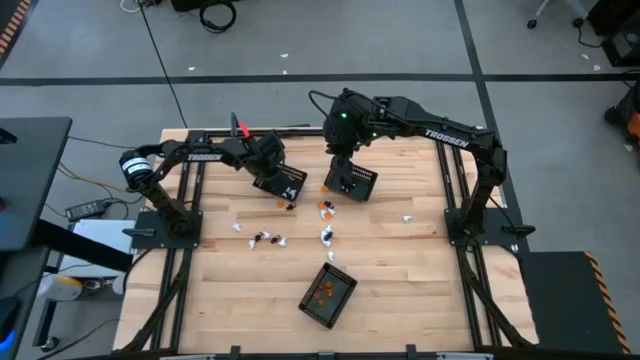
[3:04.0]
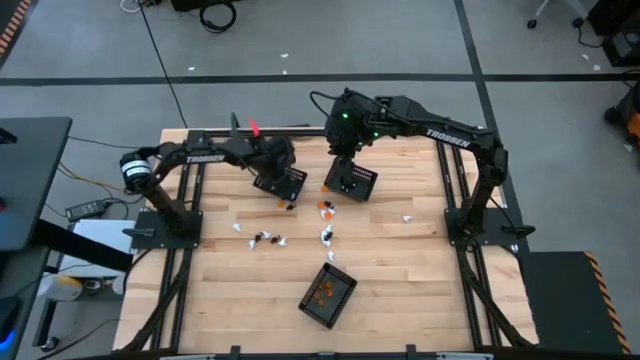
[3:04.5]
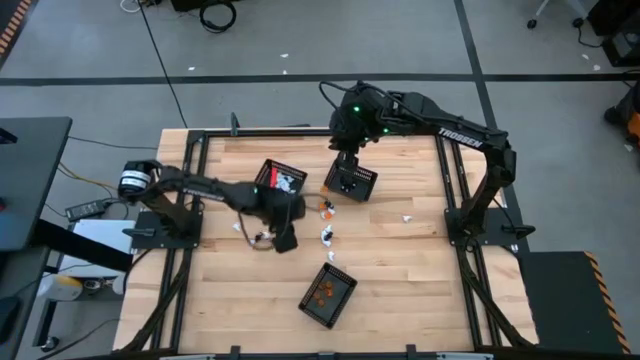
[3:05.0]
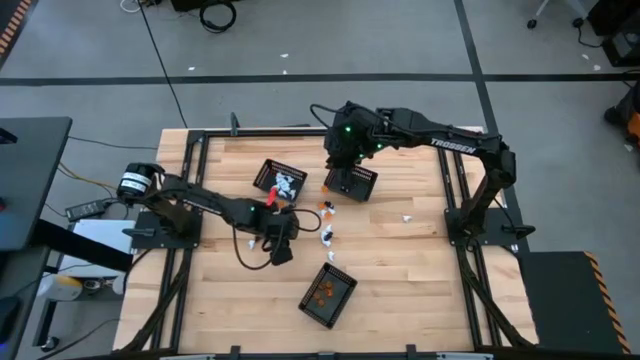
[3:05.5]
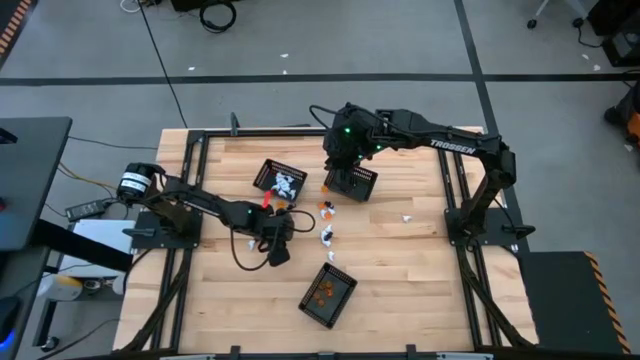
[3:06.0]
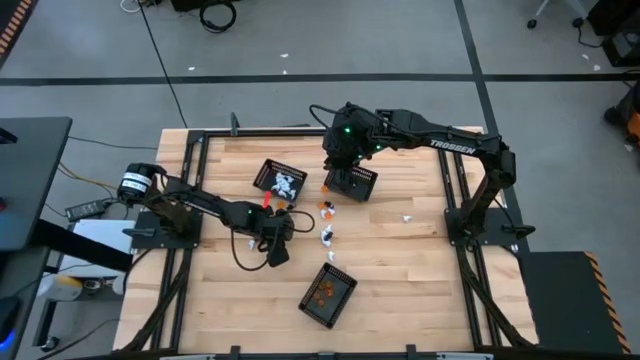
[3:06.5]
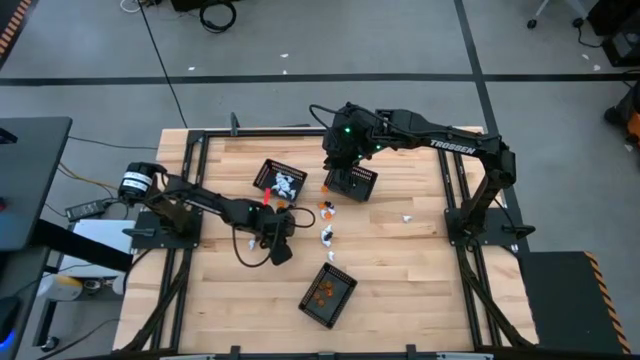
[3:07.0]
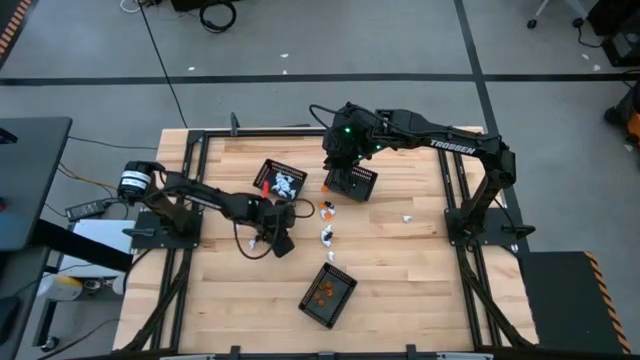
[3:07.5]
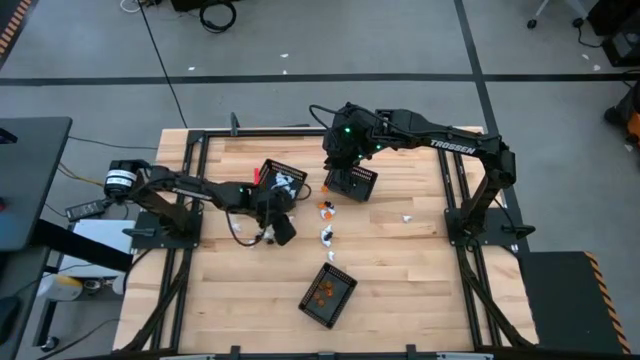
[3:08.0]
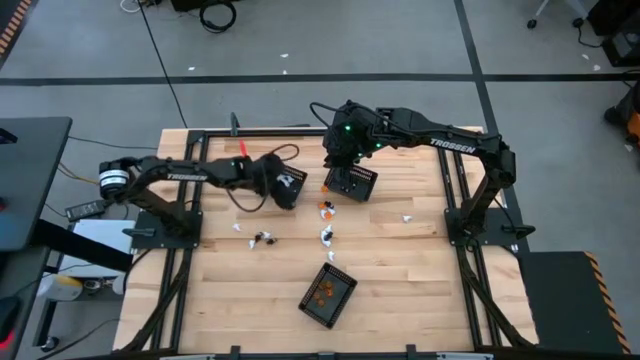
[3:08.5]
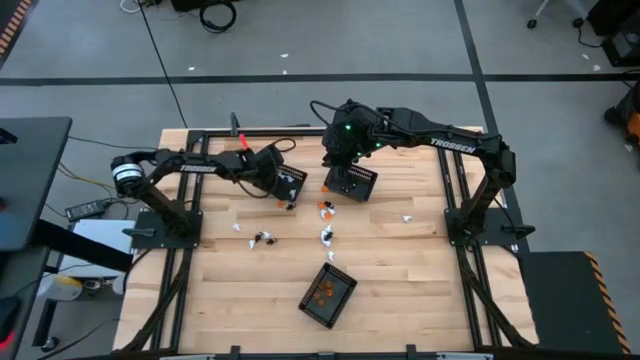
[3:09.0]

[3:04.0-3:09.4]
Task: Sort Halloween decoration
Put the white ghost toy into the top left black basket

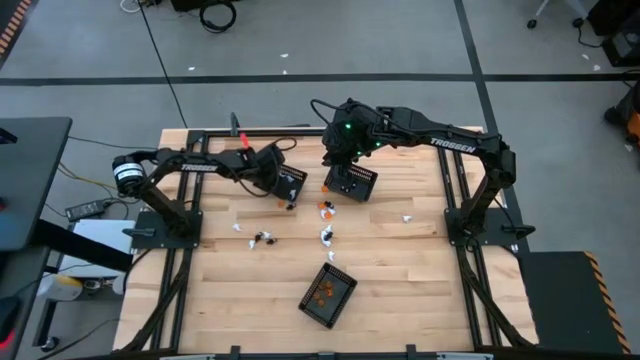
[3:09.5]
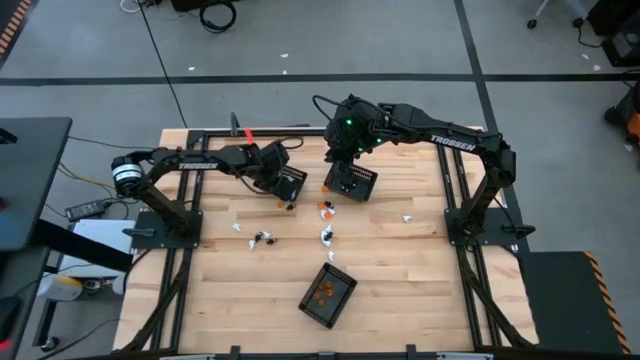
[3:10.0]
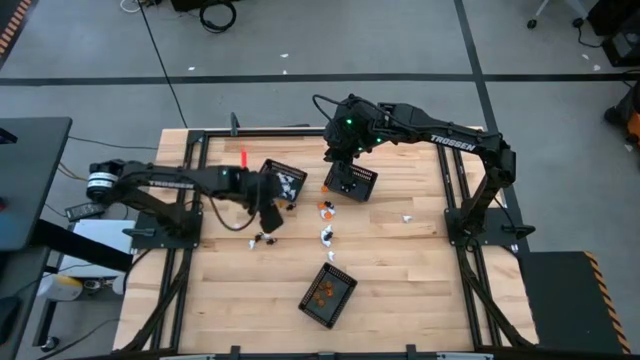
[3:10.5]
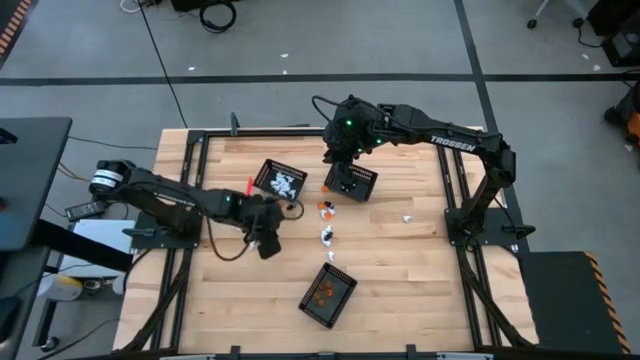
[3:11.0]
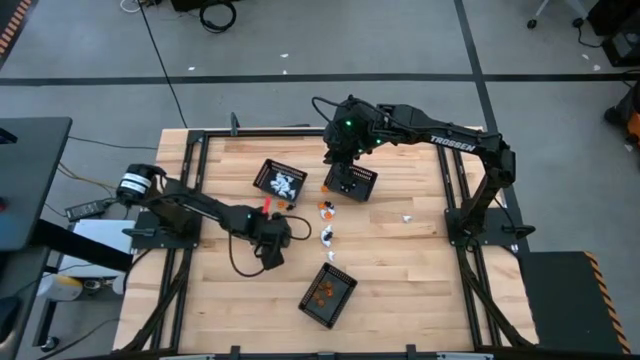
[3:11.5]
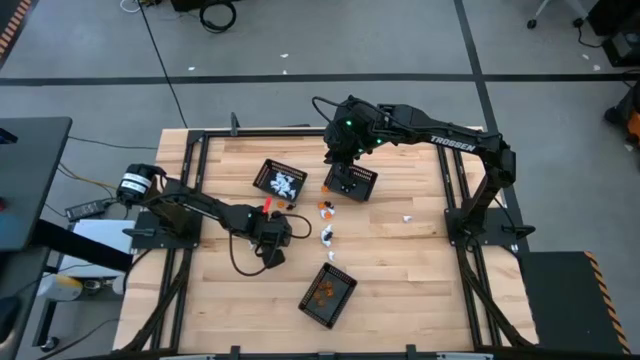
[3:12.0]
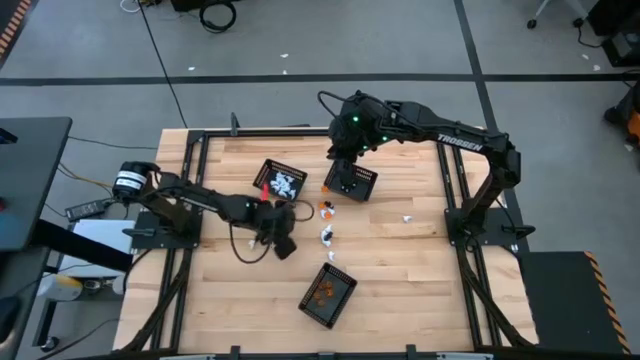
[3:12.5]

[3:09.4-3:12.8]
Put the black skeleton toy into the top right black basket

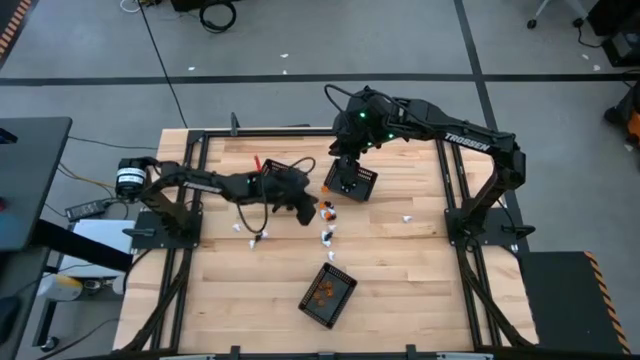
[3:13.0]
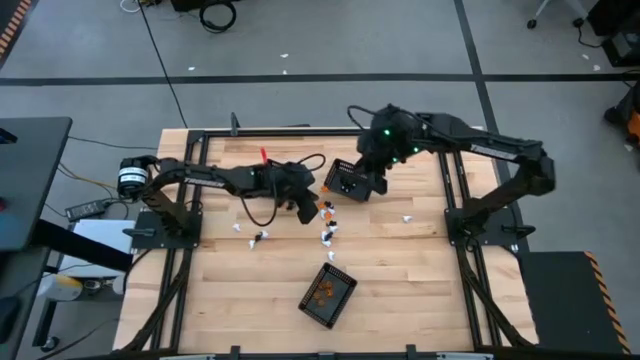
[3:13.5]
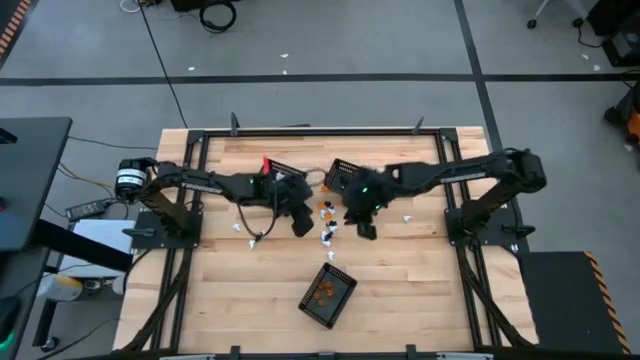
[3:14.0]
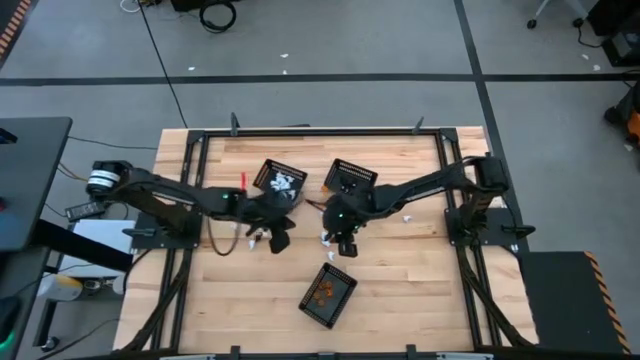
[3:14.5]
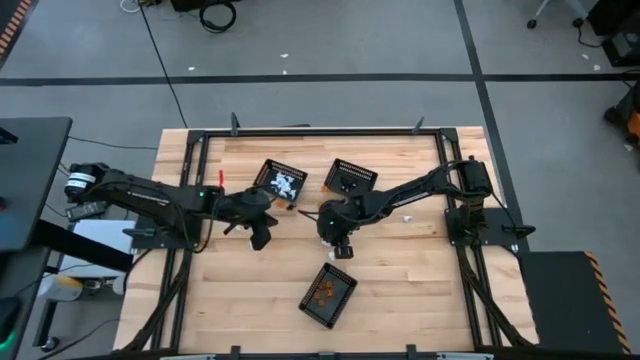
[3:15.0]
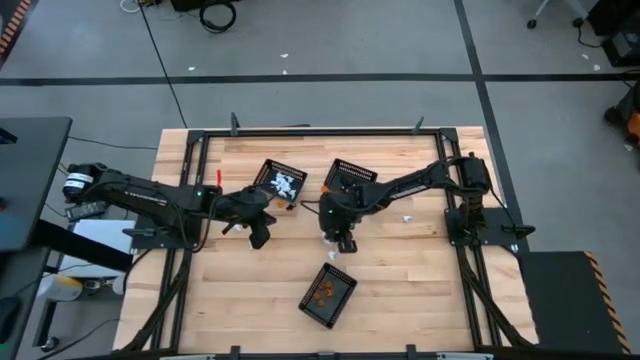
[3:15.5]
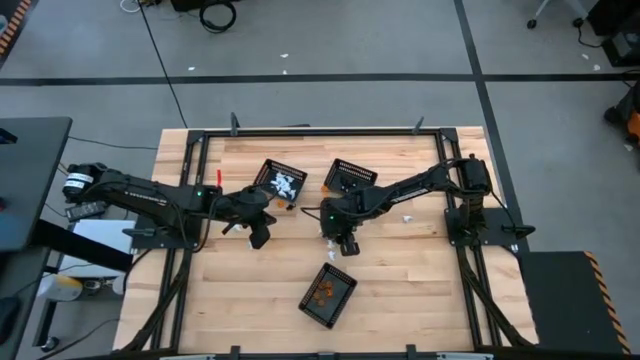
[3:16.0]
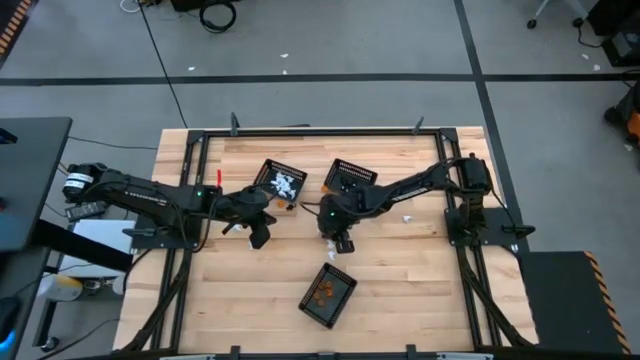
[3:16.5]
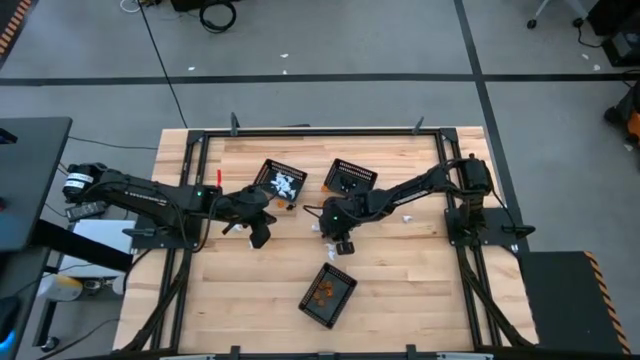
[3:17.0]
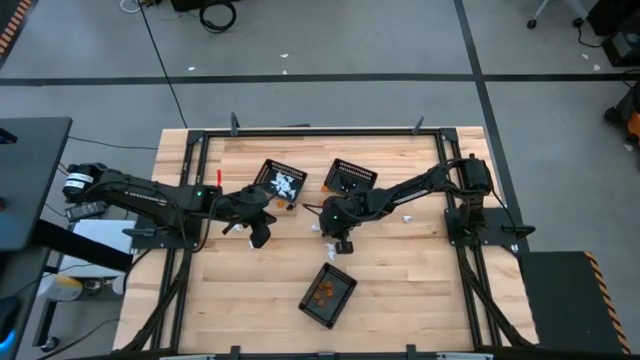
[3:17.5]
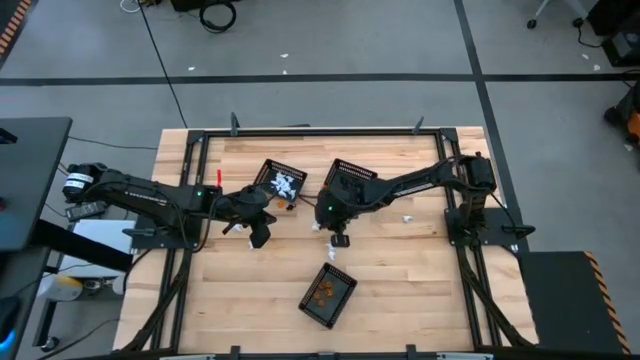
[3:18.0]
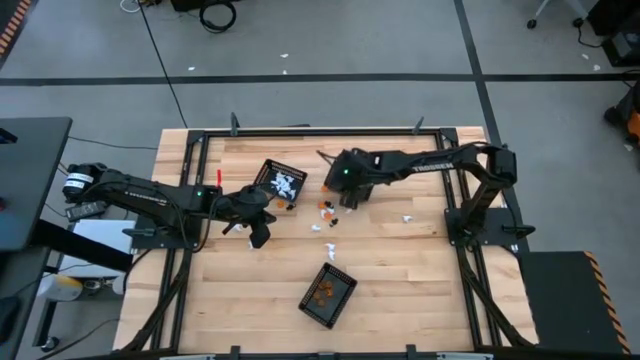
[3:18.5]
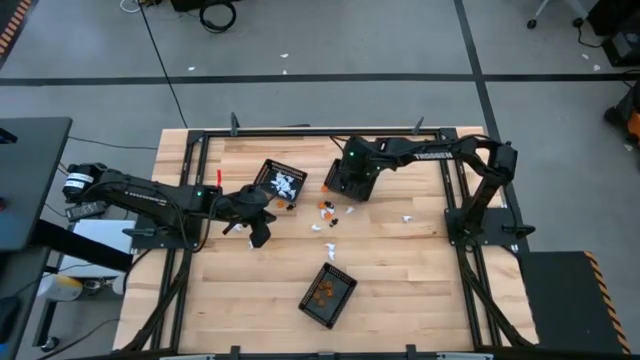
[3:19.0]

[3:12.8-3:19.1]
Put the black skeleton toy into the top right black basket

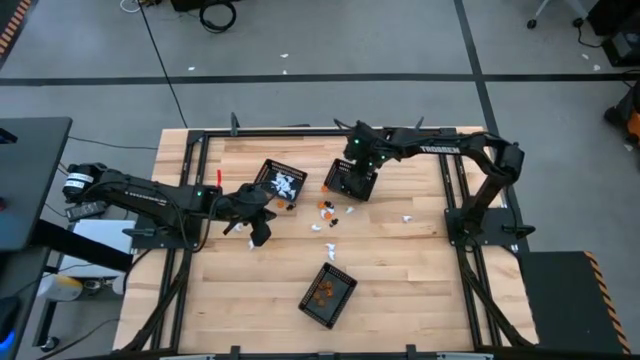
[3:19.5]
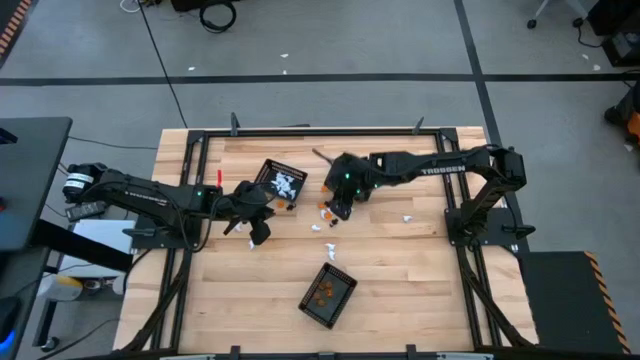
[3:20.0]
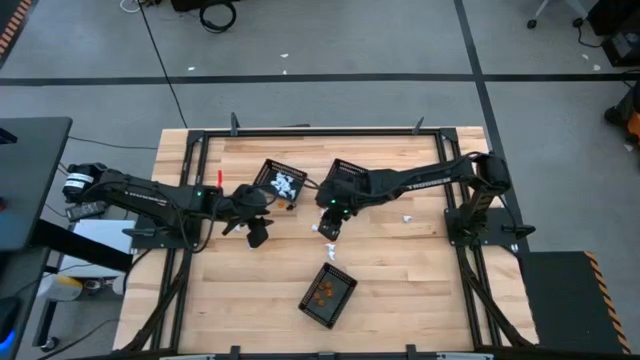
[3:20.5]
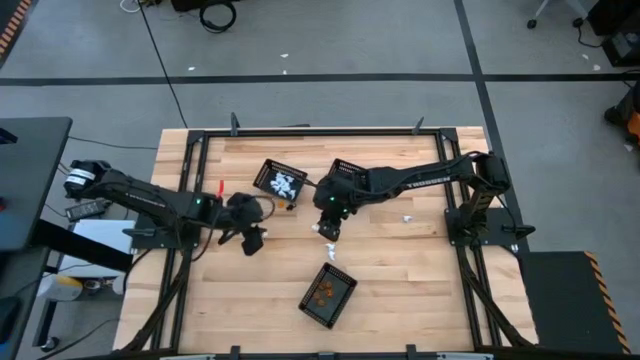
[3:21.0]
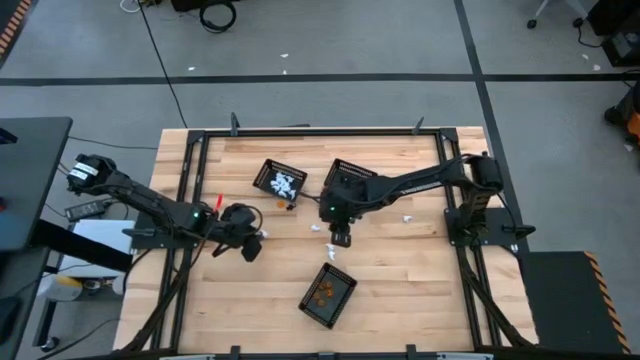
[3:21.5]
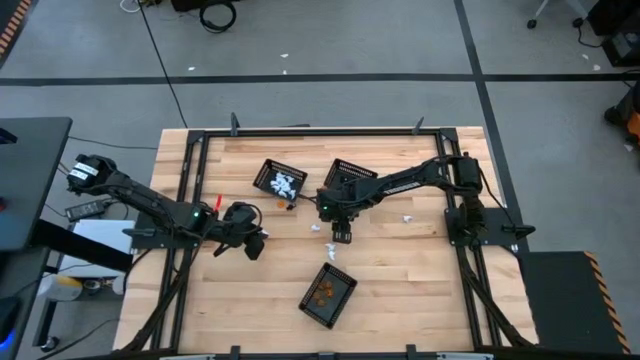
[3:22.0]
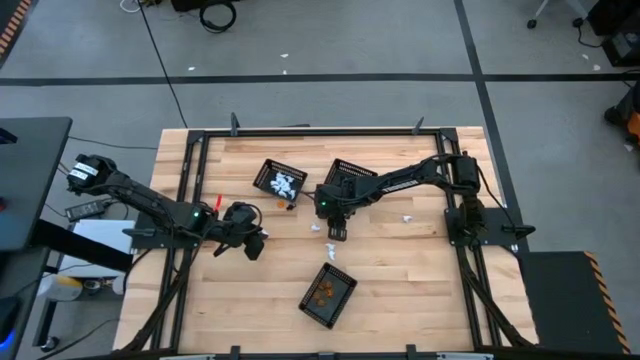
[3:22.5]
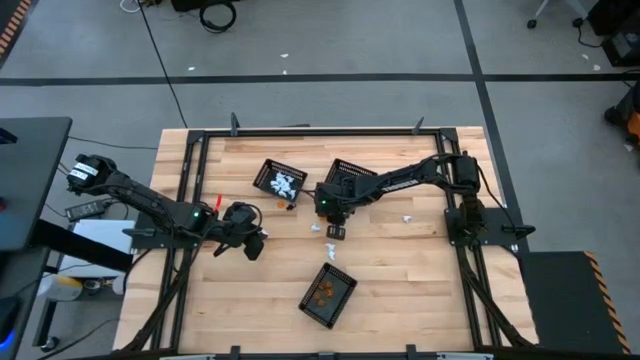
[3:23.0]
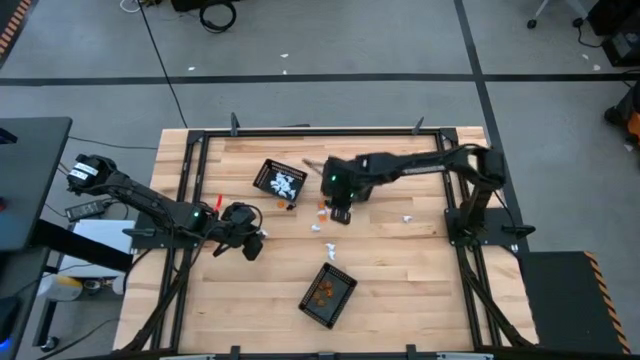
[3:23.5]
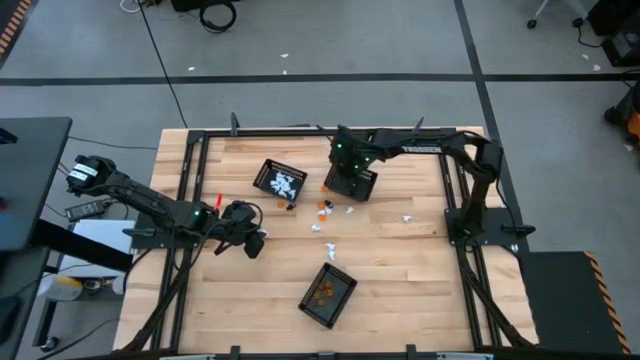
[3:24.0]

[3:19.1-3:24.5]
Put the black skeleton toy into the top right black basket

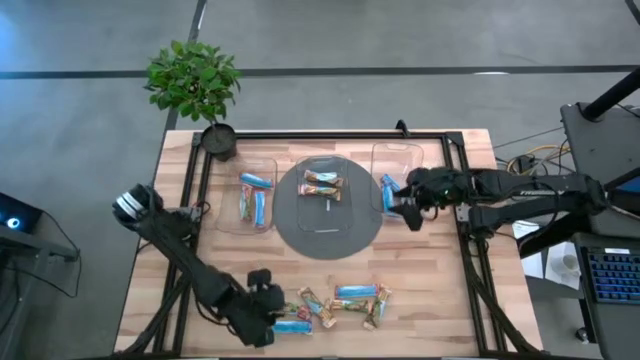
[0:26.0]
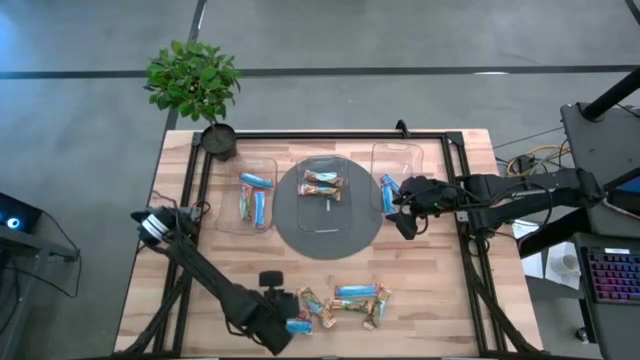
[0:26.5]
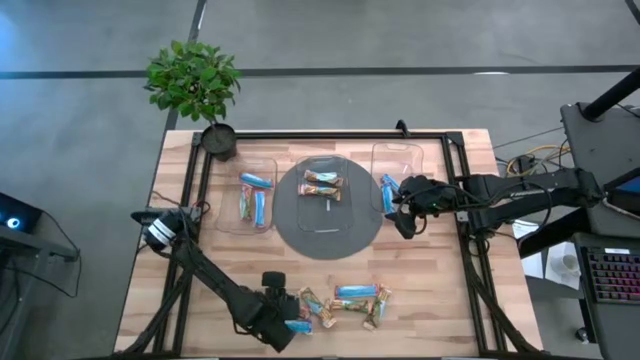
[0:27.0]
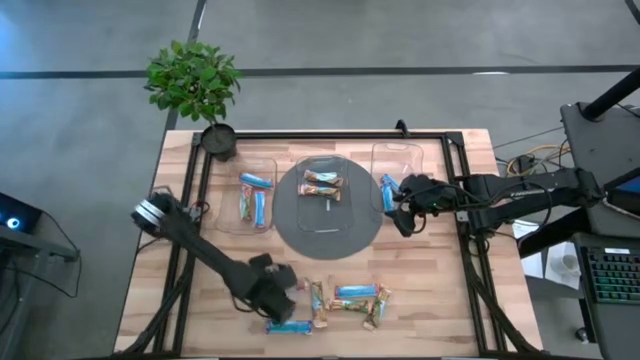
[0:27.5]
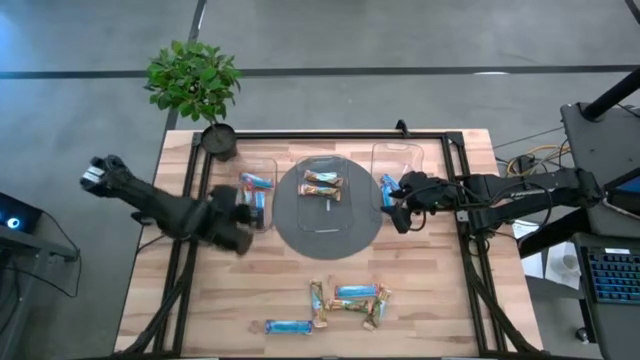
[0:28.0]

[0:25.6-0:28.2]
Task: Pick and place Granola Bars by type
Put the red granola bar into the left transparent bin
